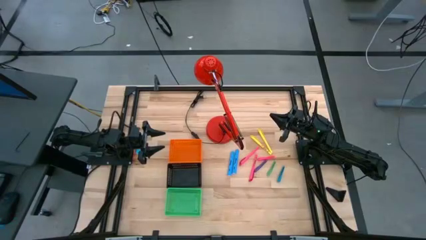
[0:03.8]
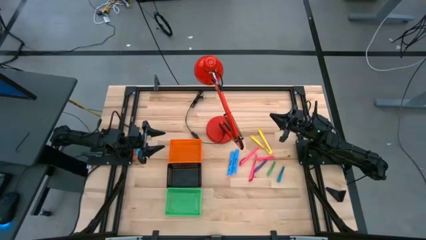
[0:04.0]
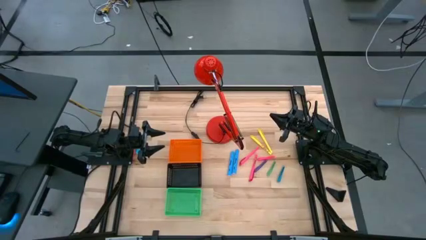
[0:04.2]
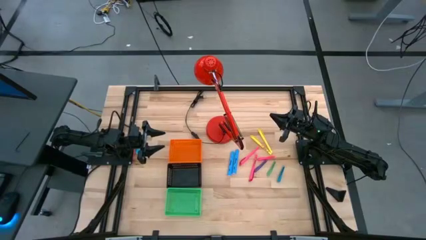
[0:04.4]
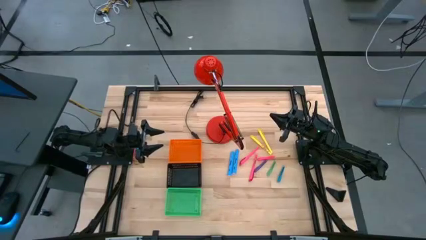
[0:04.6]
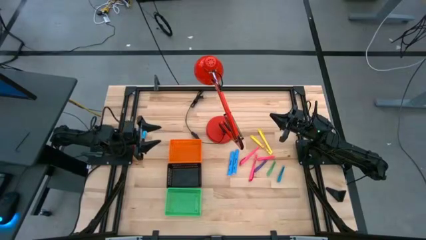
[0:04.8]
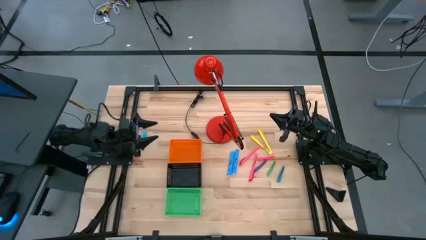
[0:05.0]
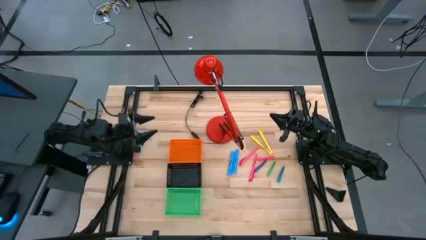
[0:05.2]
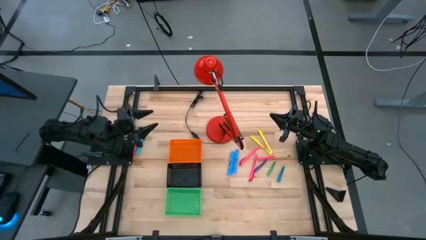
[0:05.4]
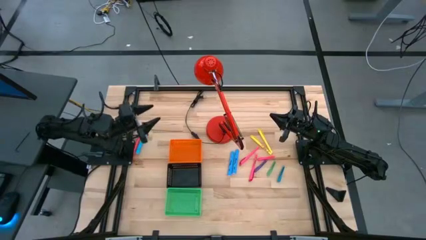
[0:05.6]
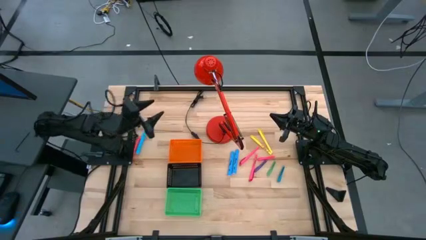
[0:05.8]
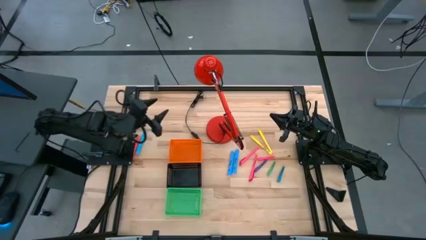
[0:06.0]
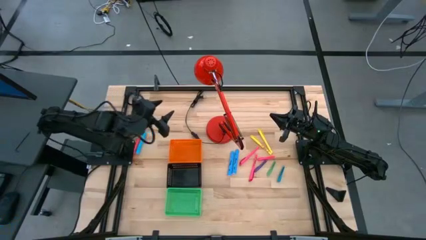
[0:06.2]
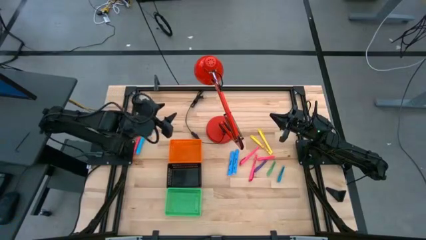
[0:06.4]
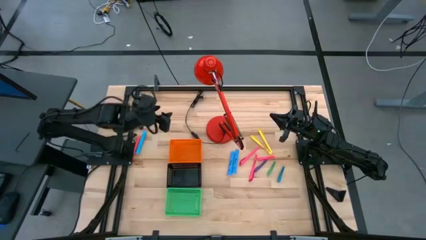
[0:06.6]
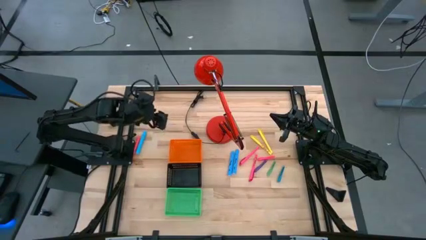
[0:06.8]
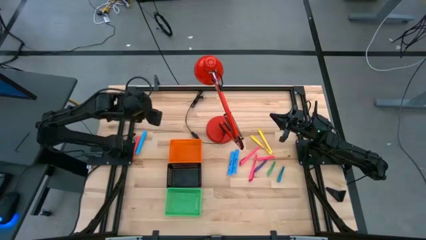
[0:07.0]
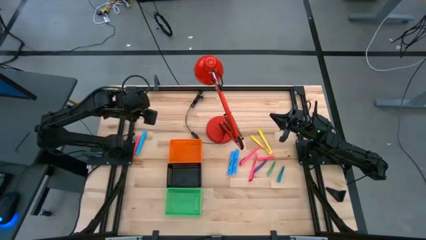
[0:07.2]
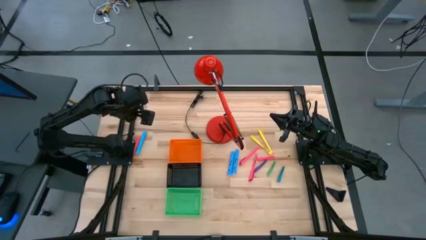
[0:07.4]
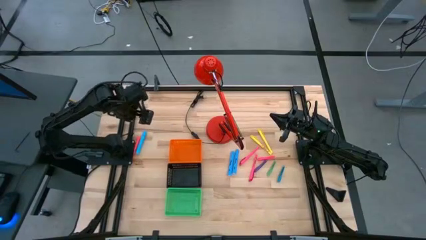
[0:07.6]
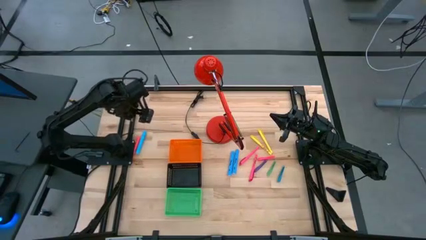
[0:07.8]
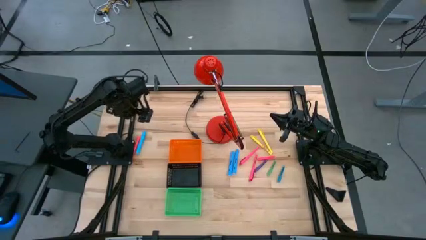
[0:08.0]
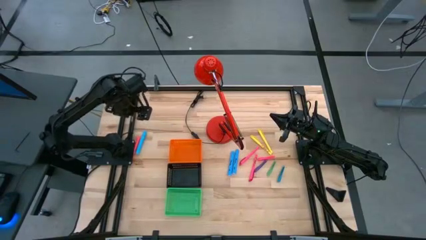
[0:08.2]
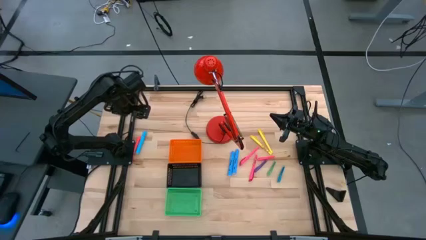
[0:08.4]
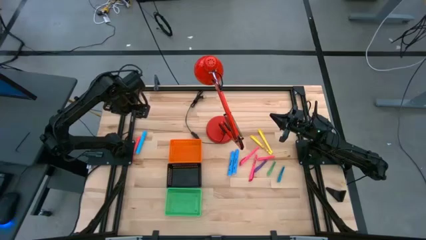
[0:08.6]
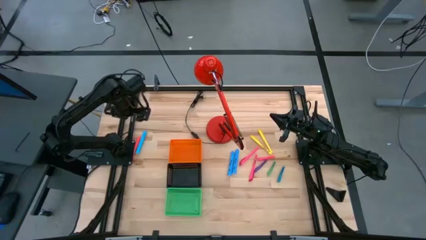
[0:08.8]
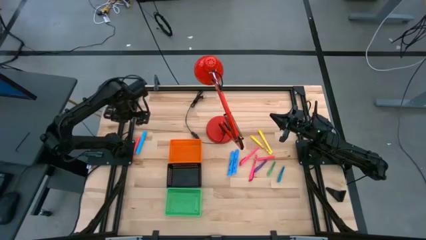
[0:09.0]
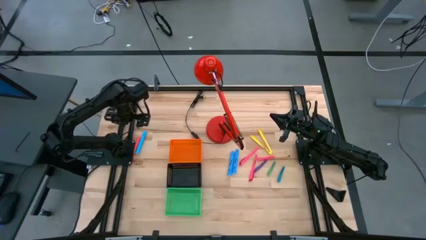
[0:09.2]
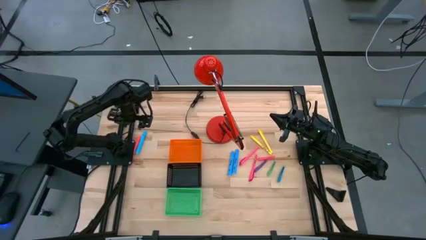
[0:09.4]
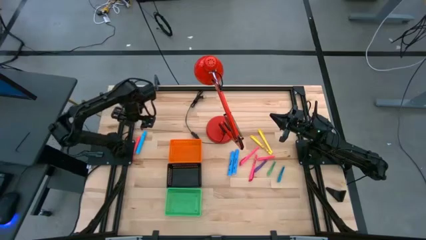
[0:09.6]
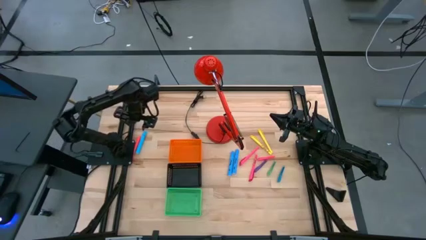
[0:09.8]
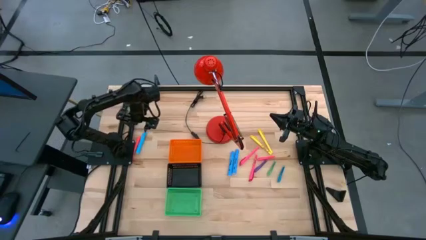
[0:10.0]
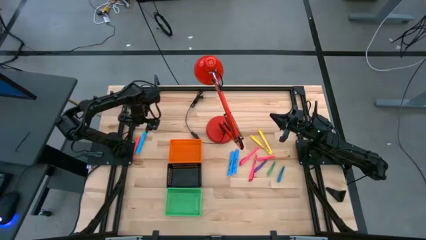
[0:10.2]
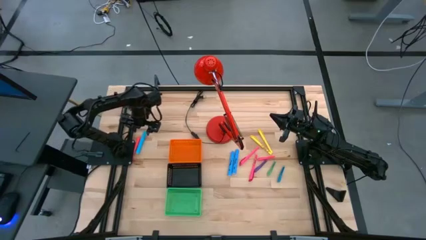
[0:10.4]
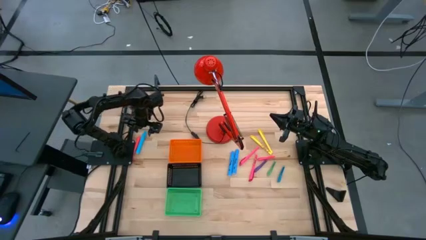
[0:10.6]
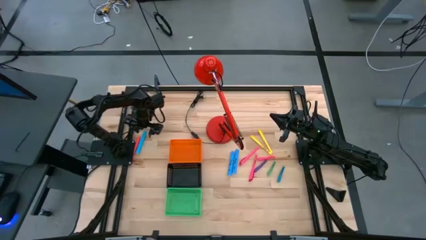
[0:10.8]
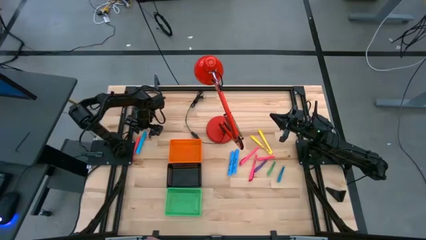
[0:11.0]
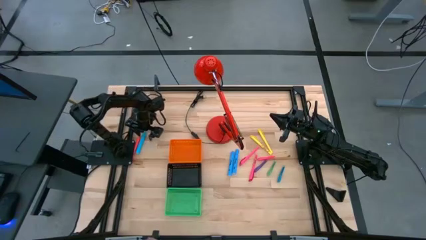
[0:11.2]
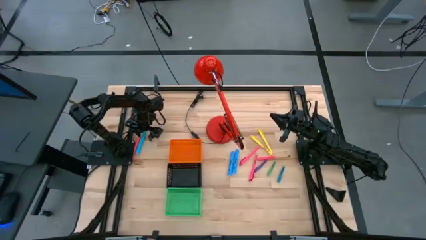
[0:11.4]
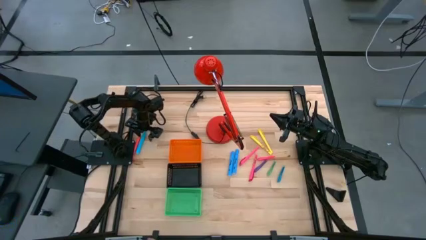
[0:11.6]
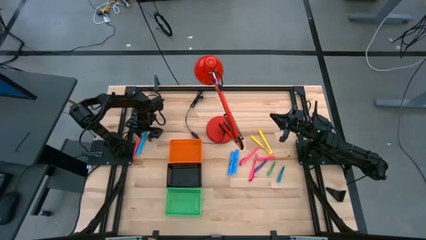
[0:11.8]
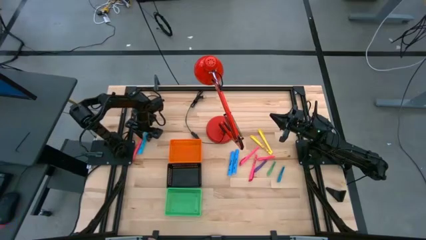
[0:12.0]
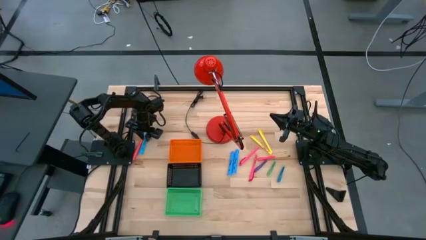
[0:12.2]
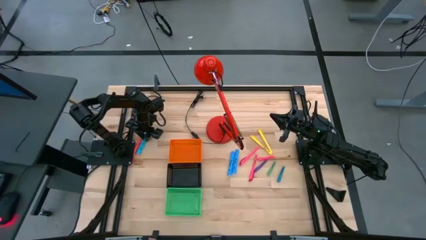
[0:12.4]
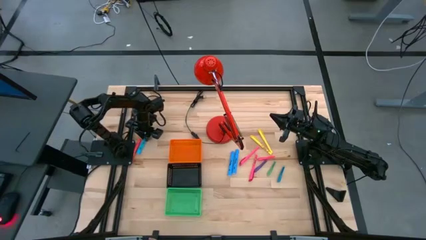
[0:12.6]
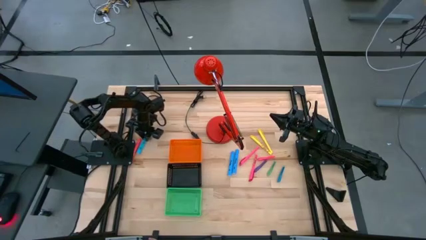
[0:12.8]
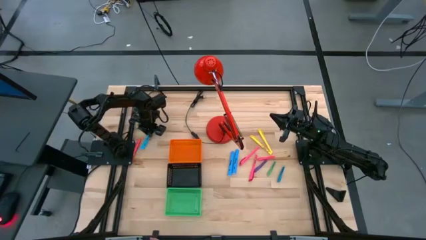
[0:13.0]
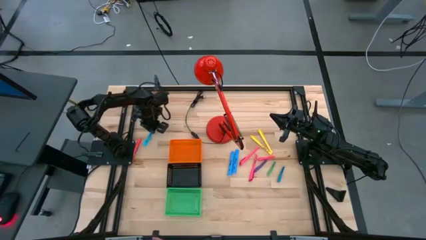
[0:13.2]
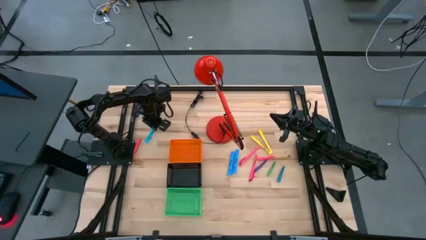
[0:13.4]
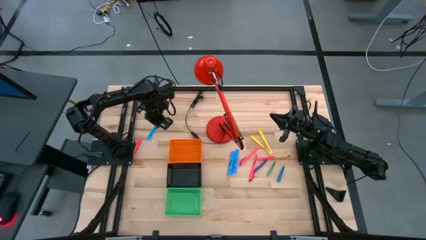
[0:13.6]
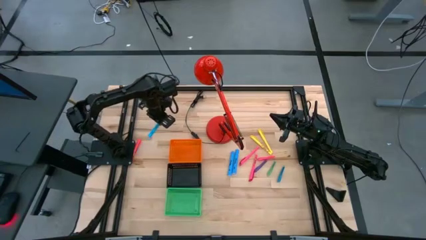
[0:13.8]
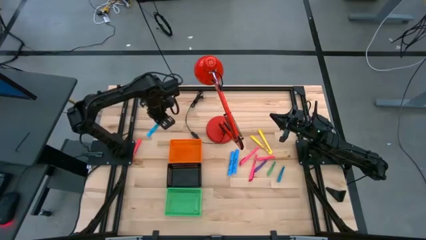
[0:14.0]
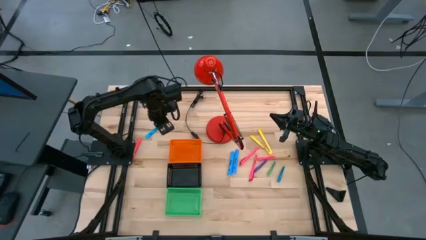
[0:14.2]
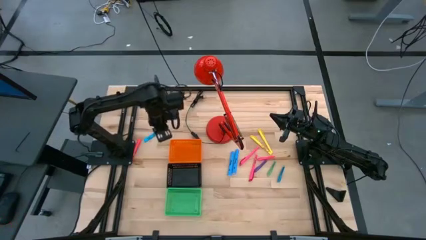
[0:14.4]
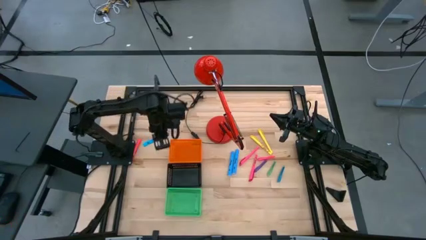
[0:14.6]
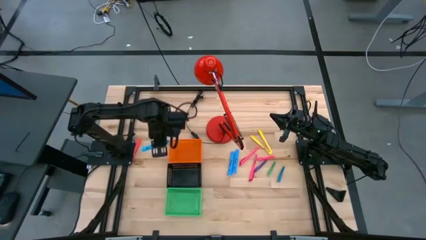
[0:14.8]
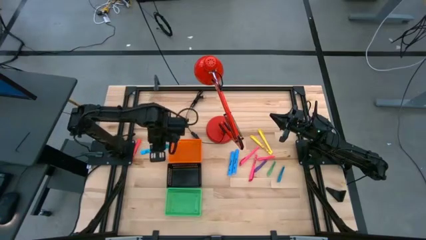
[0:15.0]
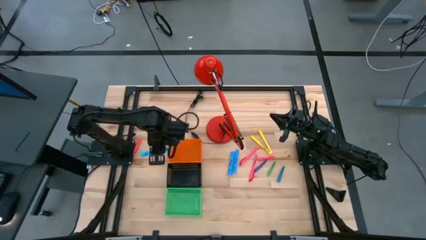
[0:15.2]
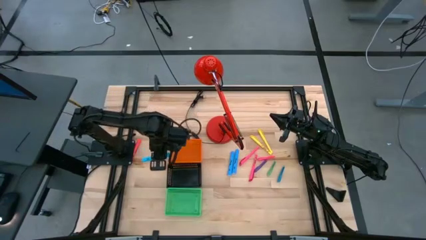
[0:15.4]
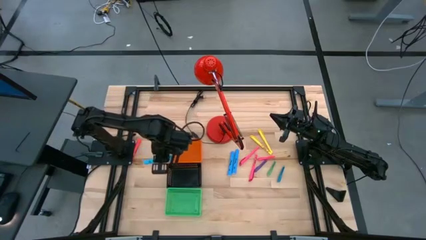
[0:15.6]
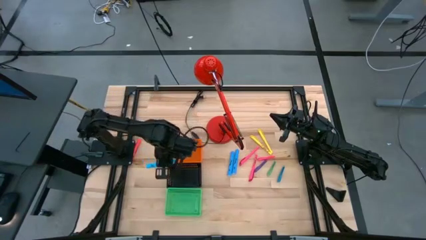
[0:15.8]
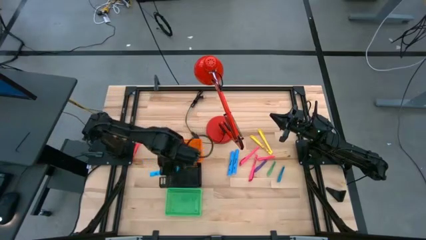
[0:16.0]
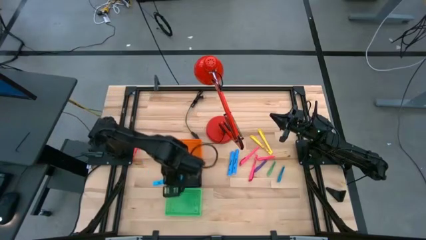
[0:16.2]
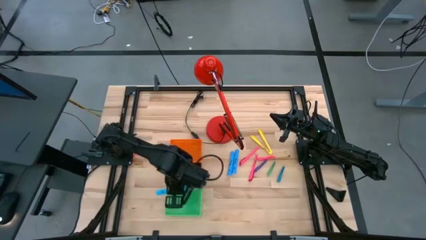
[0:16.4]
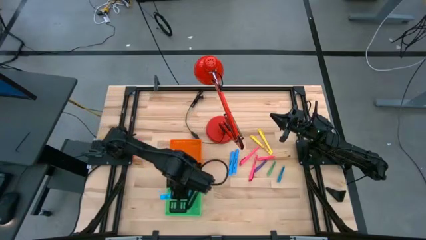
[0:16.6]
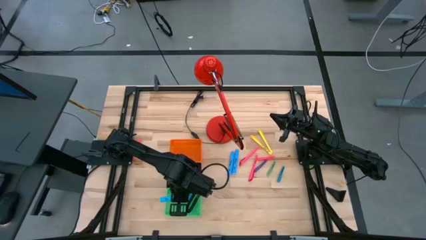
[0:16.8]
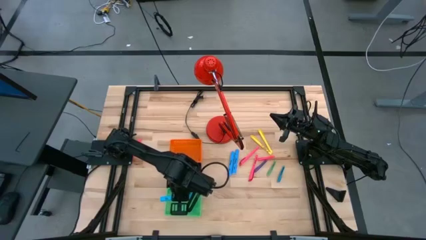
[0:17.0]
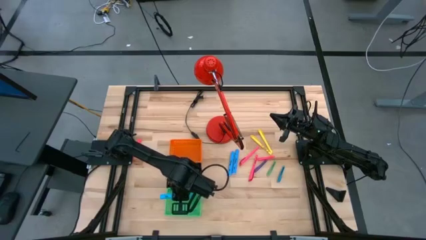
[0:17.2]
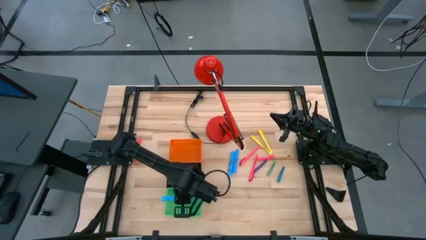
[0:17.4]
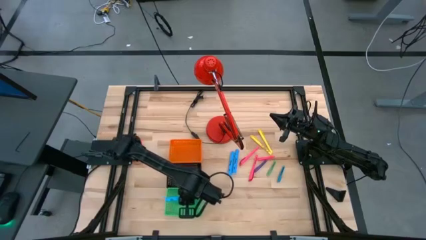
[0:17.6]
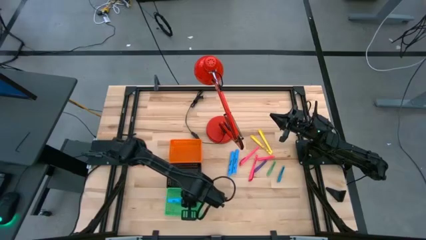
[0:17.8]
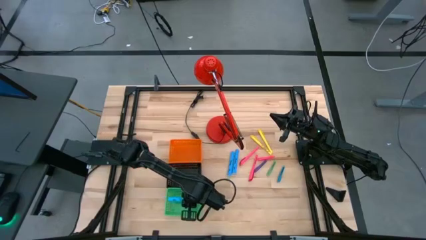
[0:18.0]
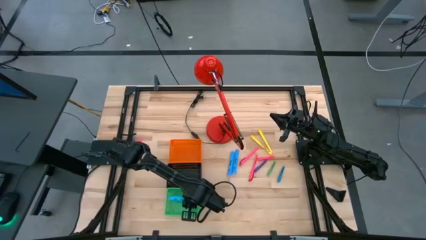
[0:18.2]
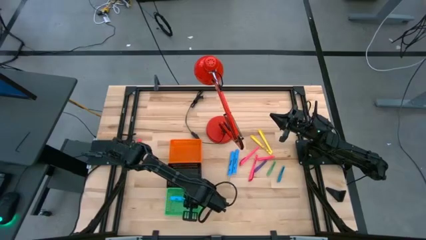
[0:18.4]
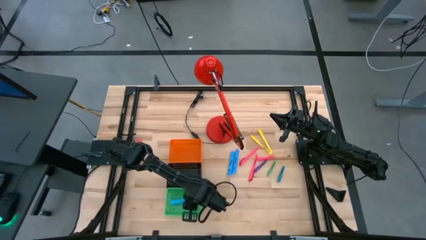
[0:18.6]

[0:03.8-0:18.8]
Task: Pick & Place Markers
Put the left blue highlighter into the green bin
